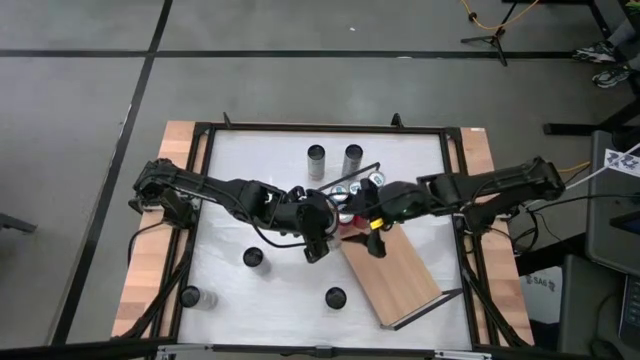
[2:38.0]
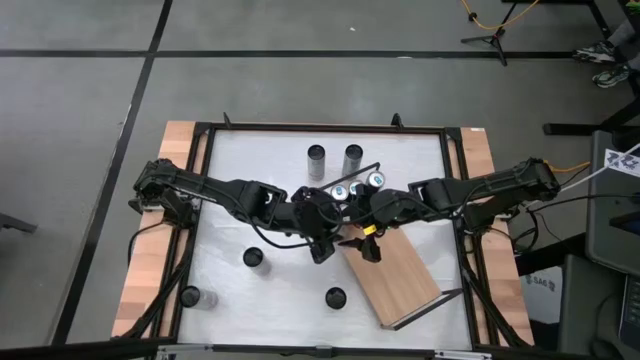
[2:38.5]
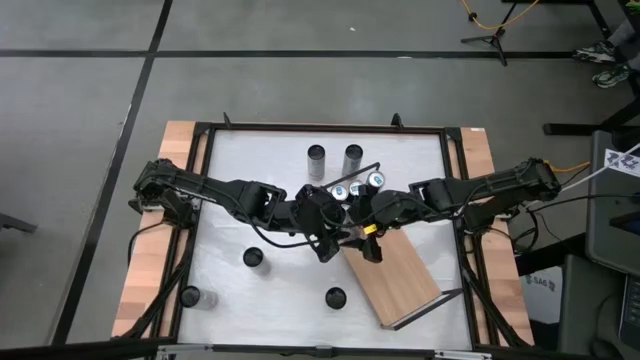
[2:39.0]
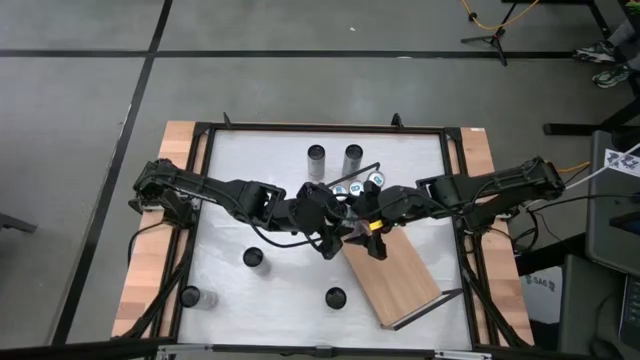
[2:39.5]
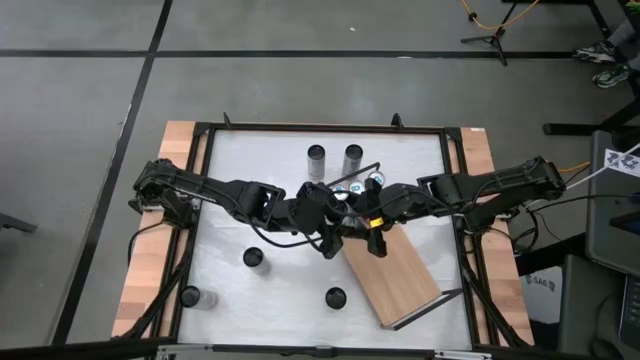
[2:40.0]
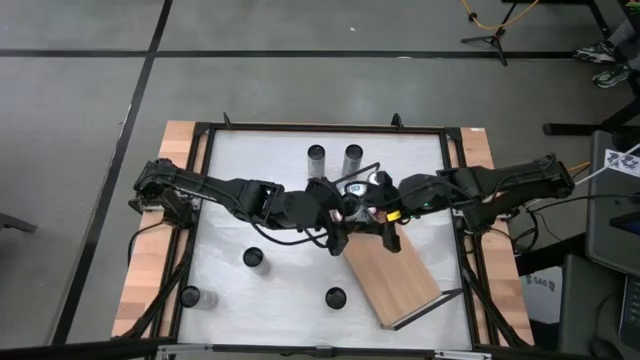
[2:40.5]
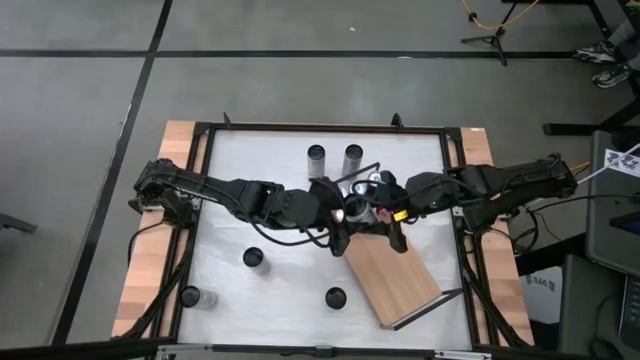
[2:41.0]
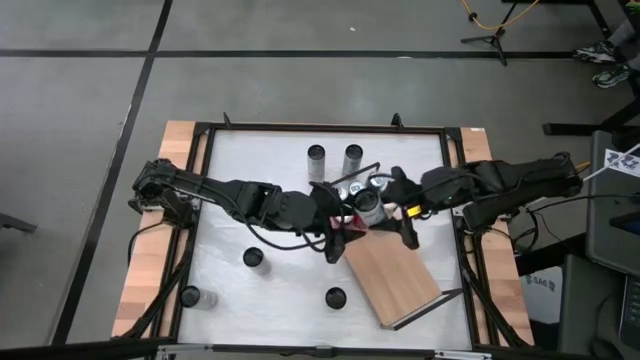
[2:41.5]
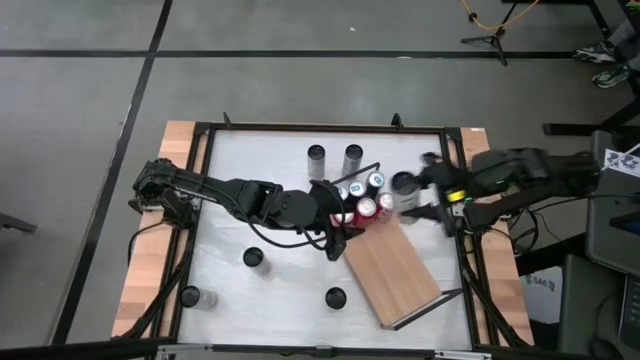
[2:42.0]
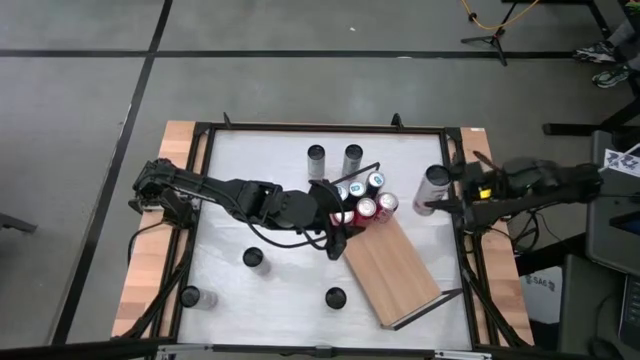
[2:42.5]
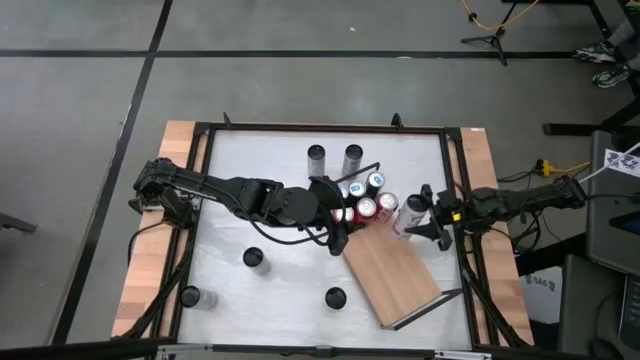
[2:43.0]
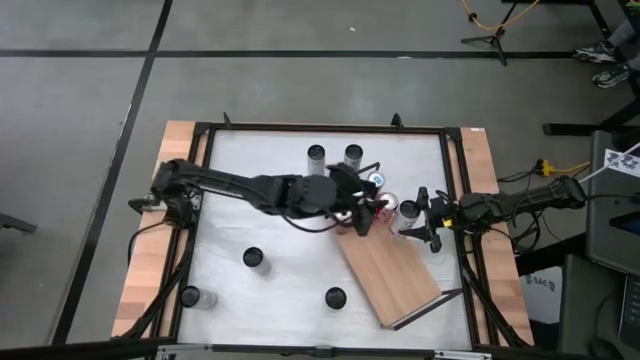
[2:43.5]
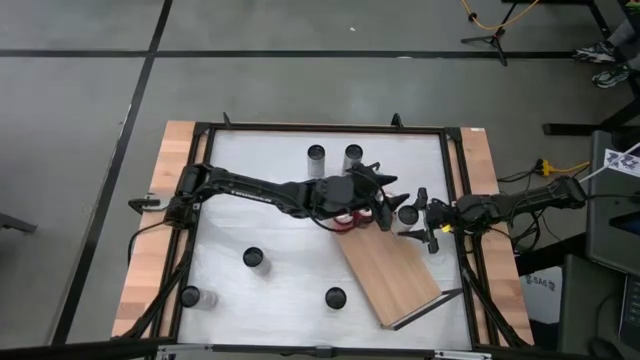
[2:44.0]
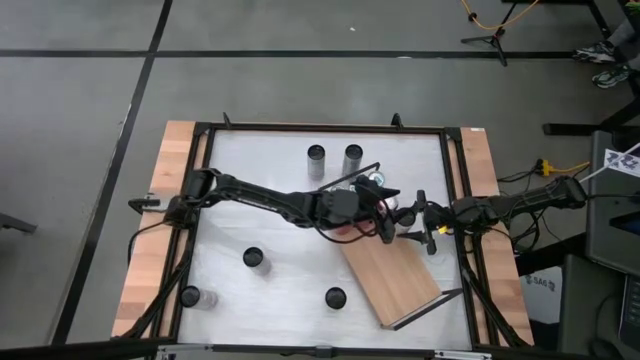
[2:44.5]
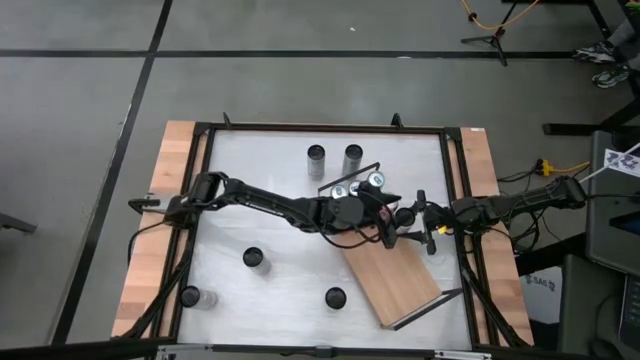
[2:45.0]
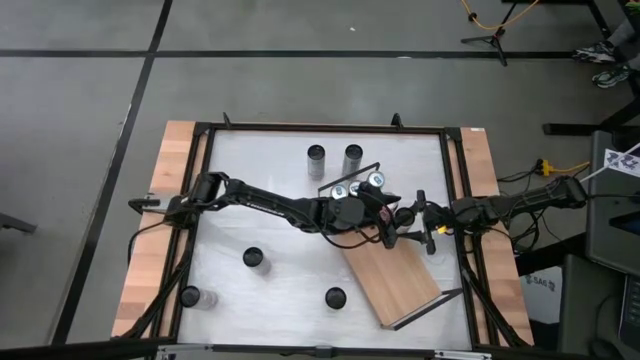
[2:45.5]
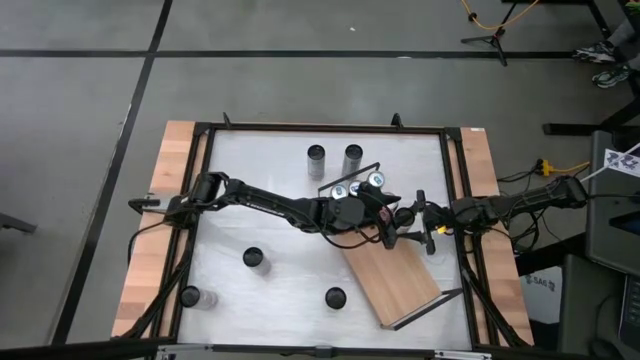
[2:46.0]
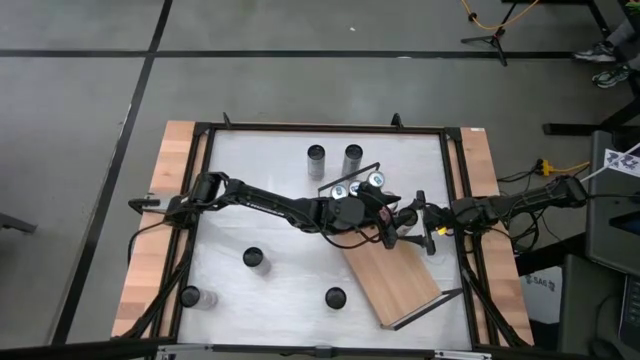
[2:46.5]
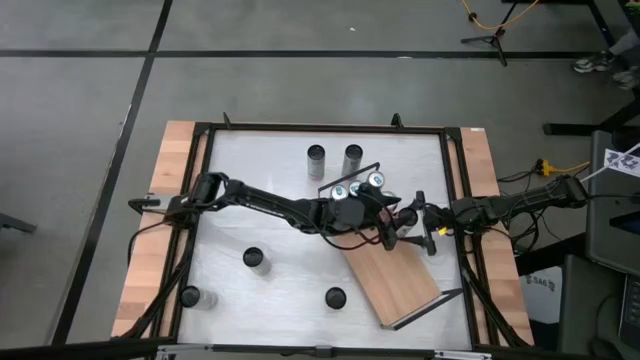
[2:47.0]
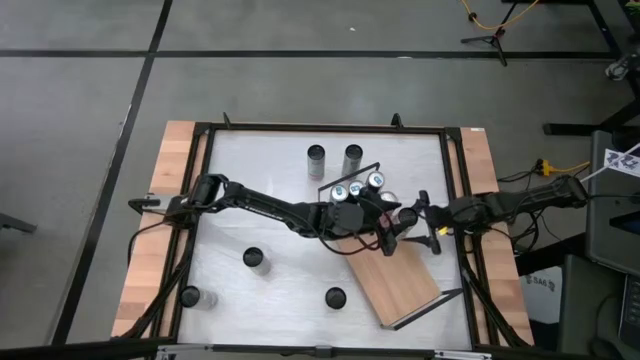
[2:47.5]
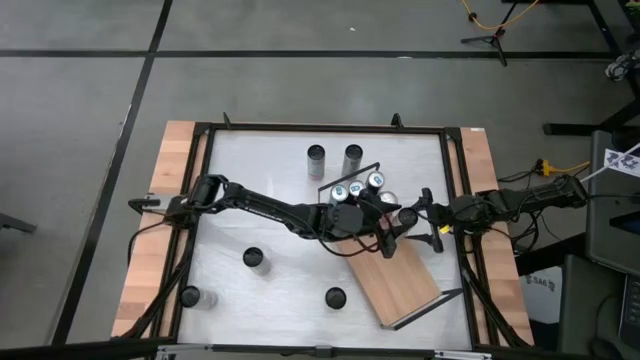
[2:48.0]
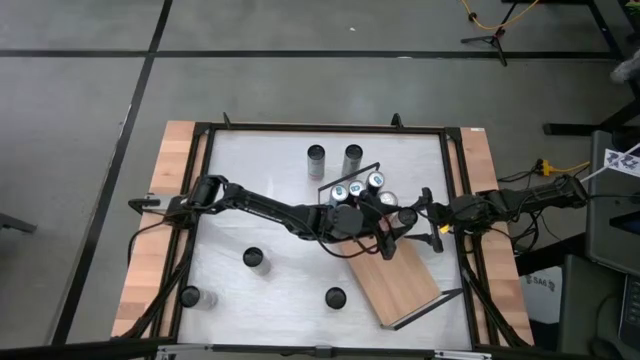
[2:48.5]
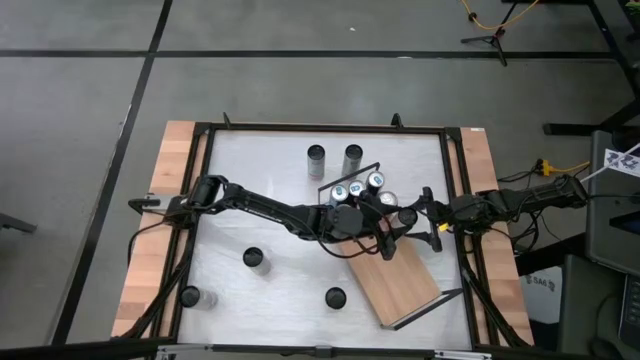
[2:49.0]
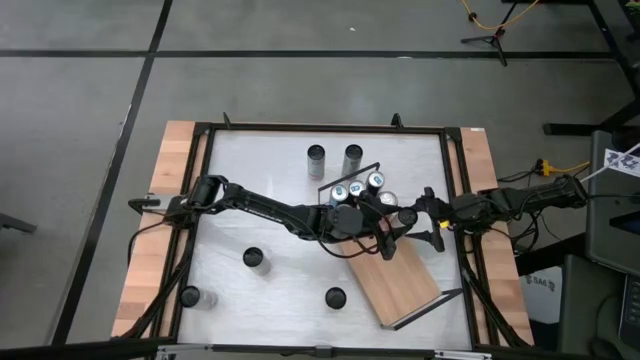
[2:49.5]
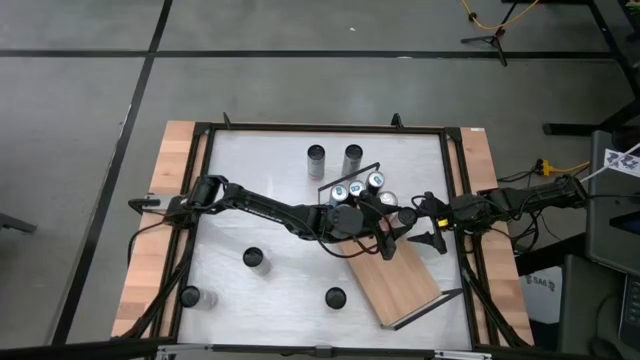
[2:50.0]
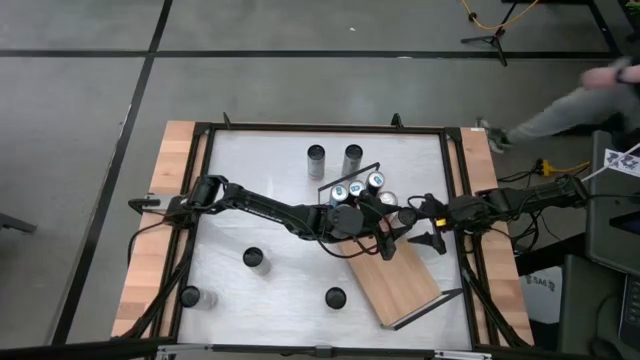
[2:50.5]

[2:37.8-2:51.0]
Task: Place canned beverage on shelf
Put the white pink soda can on the shelf

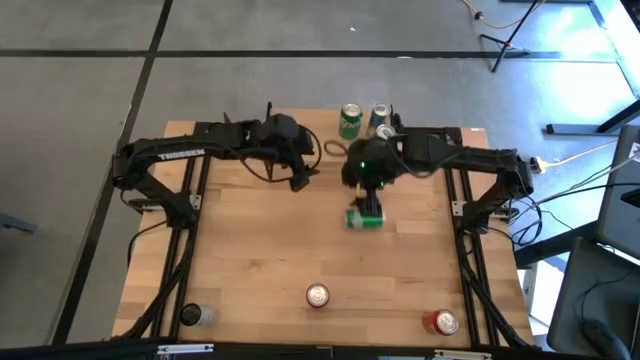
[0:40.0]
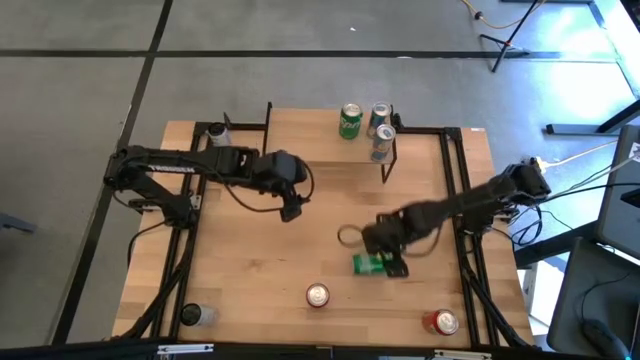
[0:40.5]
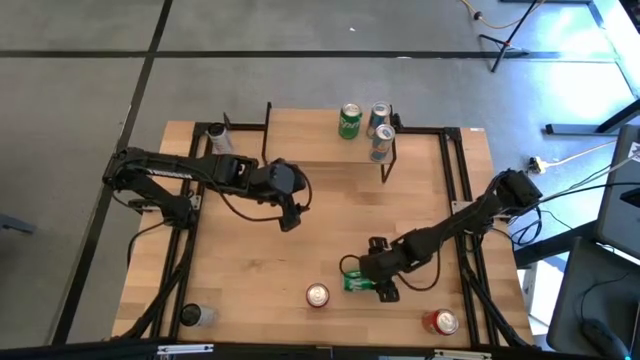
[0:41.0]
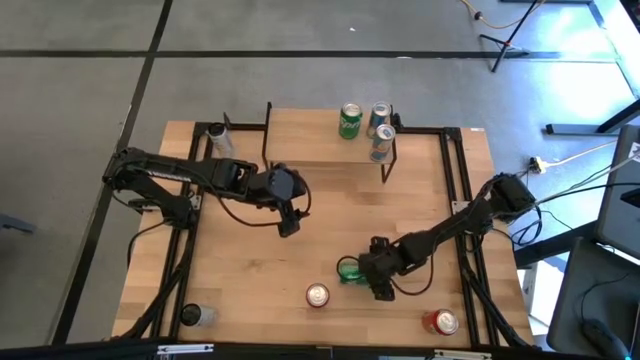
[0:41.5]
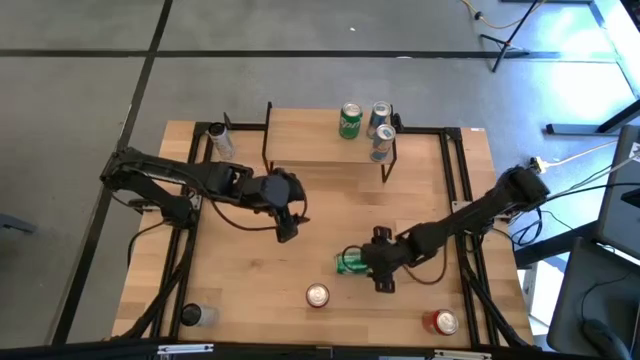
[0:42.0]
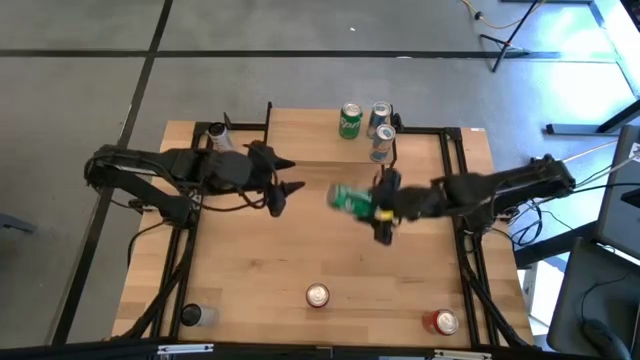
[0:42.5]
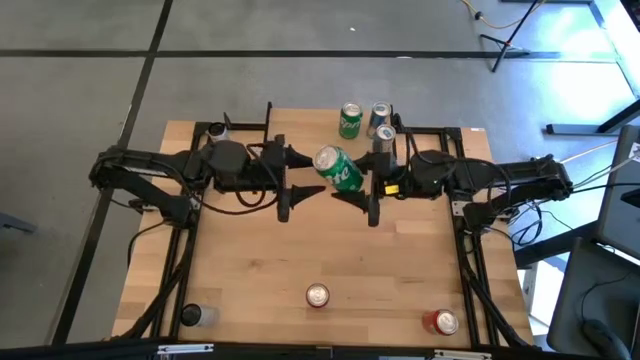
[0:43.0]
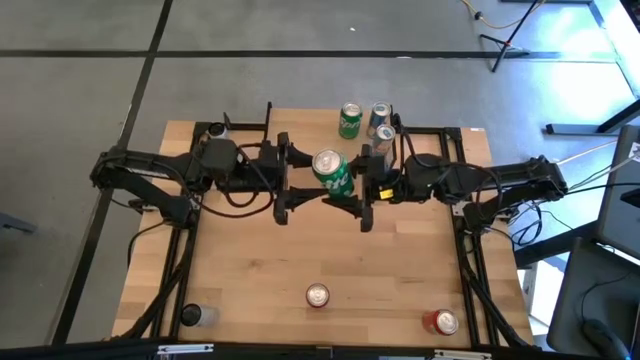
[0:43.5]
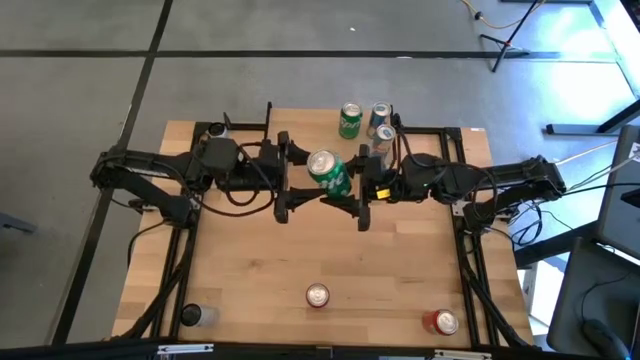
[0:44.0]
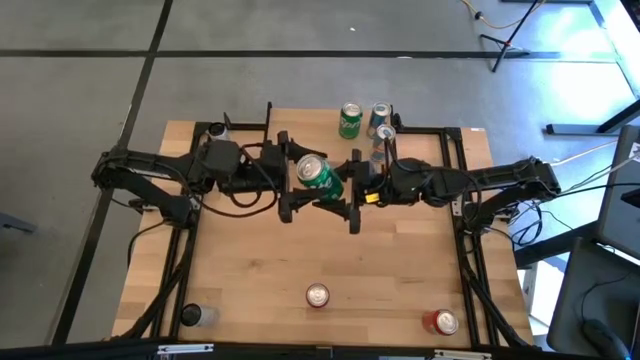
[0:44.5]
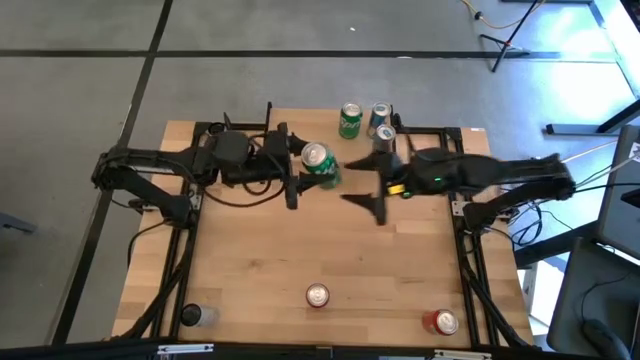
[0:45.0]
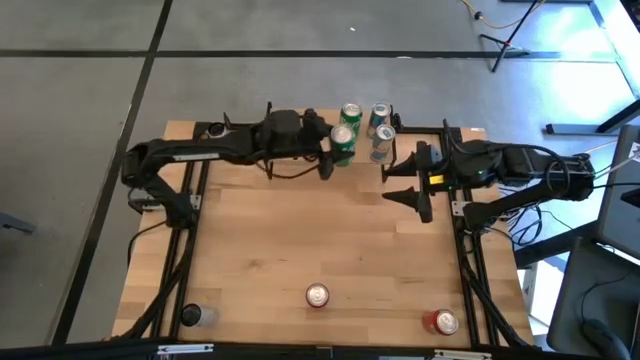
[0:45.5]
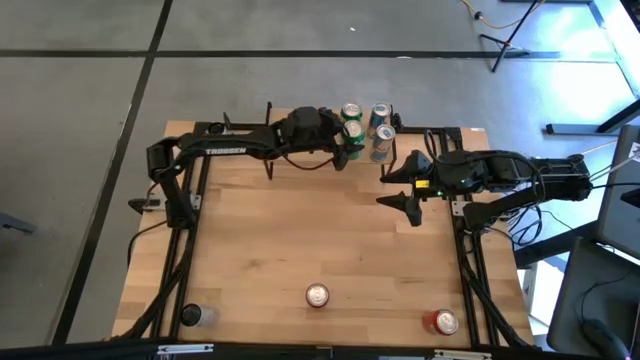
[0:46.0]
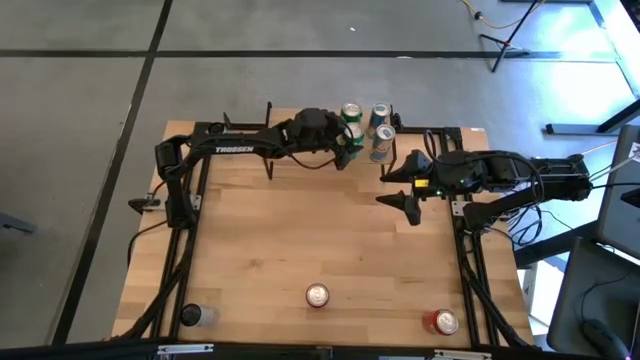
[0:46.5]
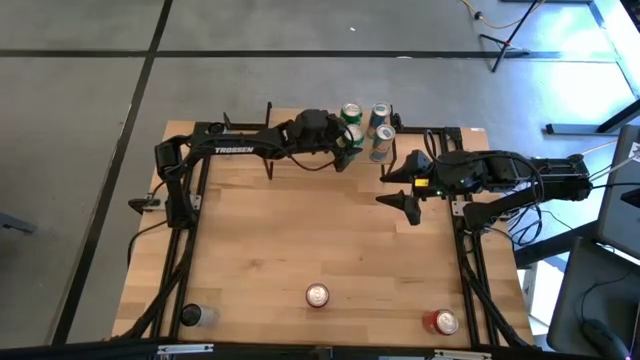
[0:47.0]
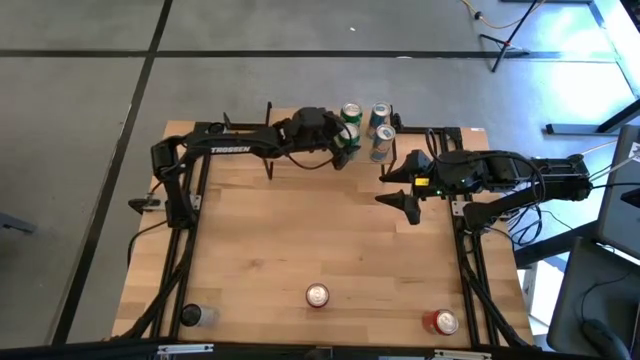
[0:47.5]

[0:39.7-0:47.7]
Task: Place canned beverage on shelf
Put the green soda can on the shelf aligned with the other green soda can
